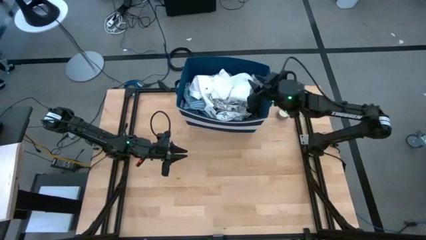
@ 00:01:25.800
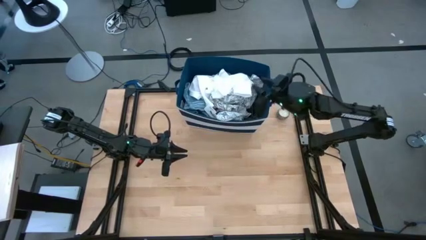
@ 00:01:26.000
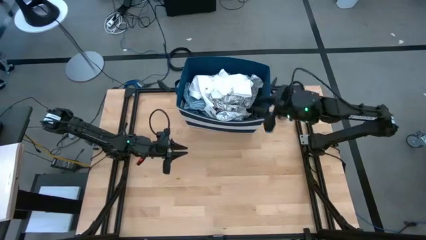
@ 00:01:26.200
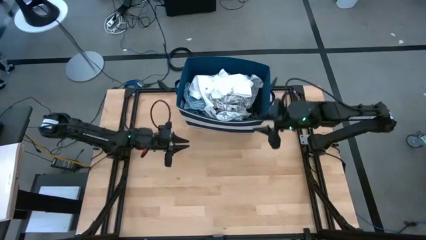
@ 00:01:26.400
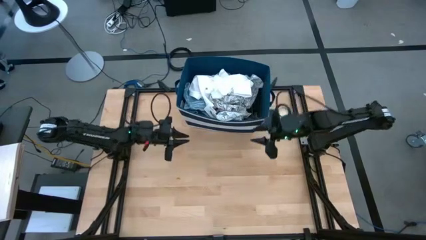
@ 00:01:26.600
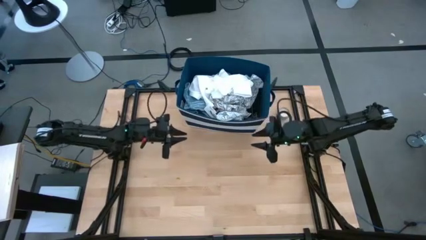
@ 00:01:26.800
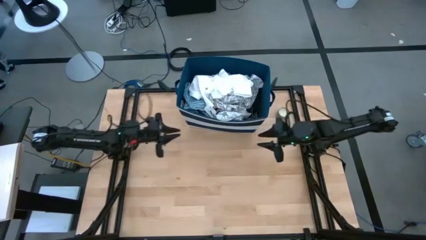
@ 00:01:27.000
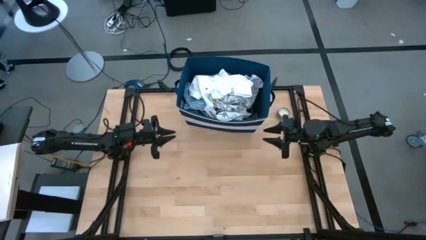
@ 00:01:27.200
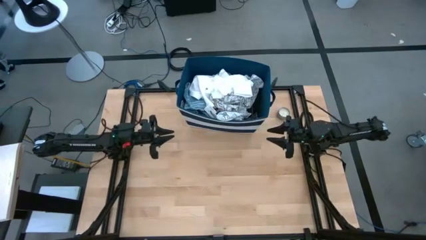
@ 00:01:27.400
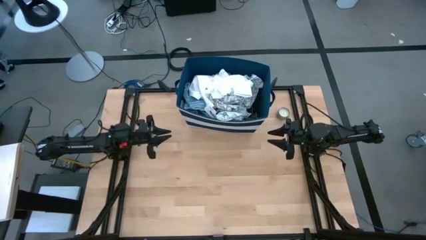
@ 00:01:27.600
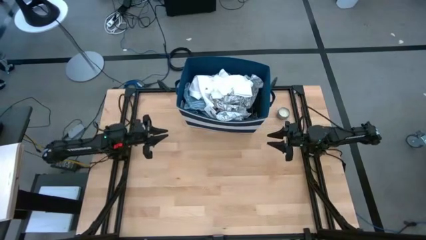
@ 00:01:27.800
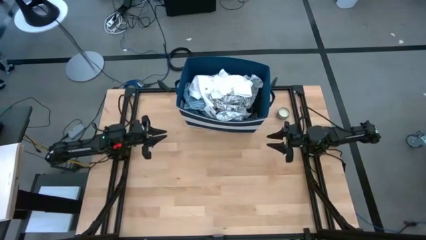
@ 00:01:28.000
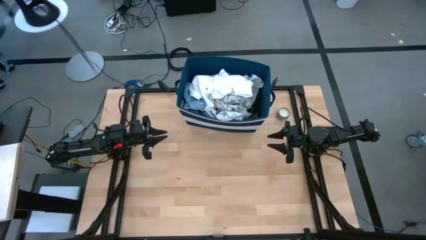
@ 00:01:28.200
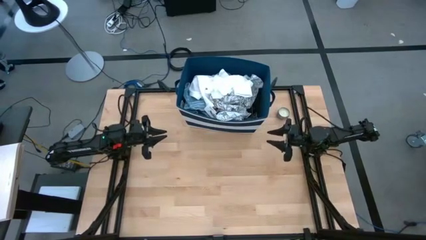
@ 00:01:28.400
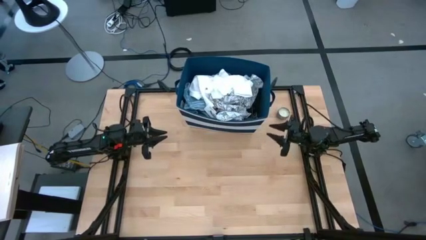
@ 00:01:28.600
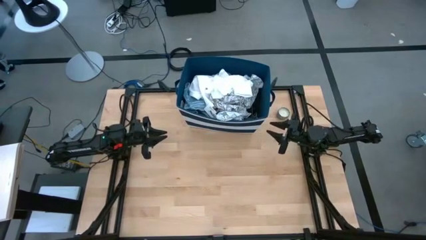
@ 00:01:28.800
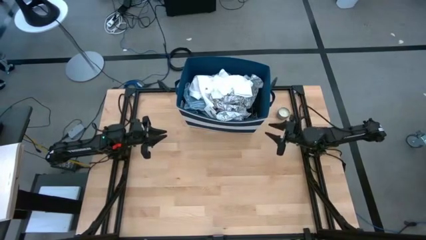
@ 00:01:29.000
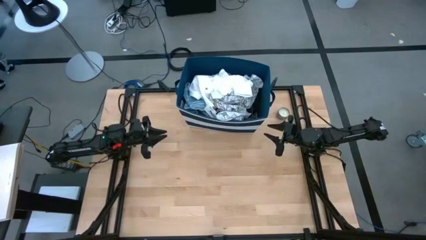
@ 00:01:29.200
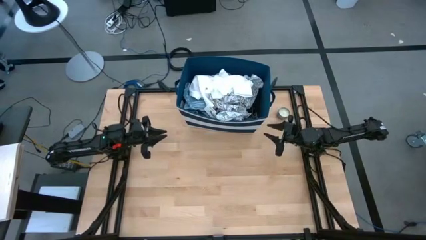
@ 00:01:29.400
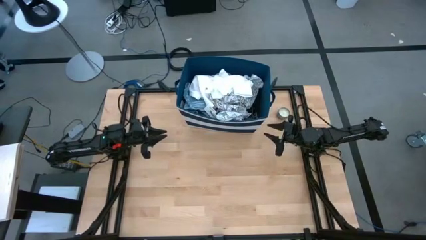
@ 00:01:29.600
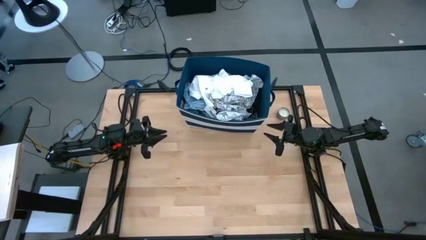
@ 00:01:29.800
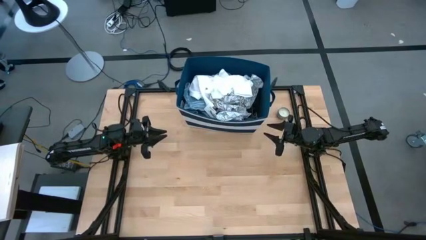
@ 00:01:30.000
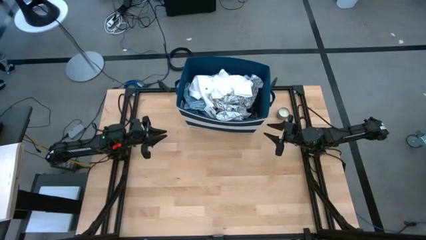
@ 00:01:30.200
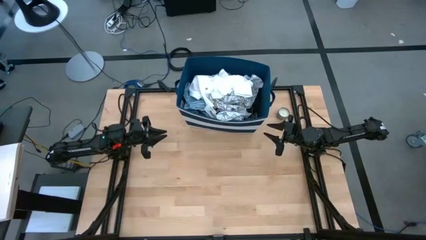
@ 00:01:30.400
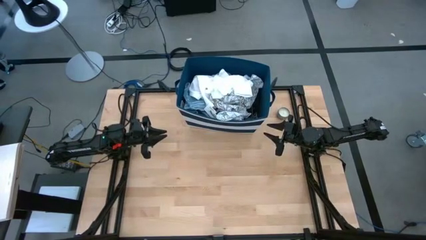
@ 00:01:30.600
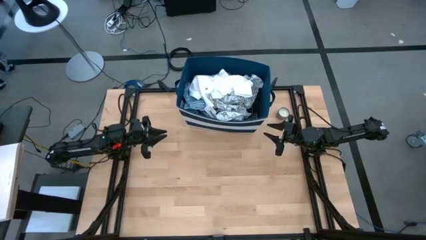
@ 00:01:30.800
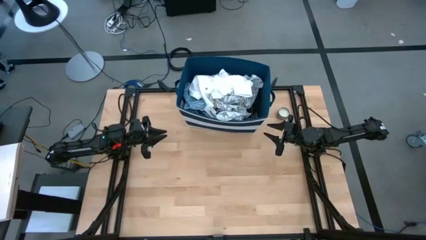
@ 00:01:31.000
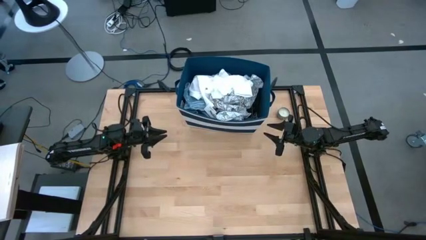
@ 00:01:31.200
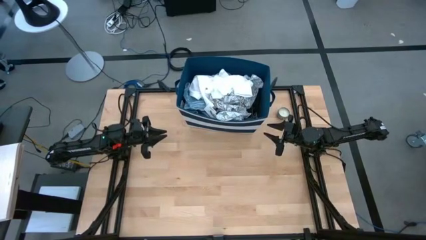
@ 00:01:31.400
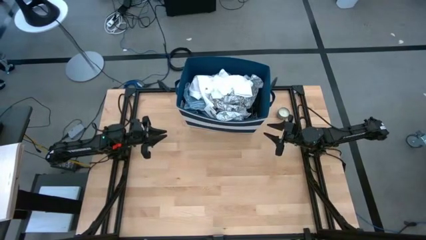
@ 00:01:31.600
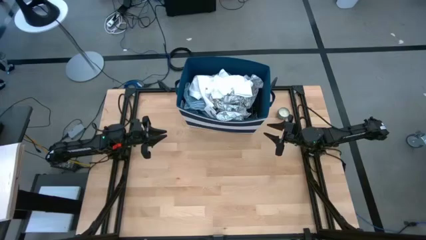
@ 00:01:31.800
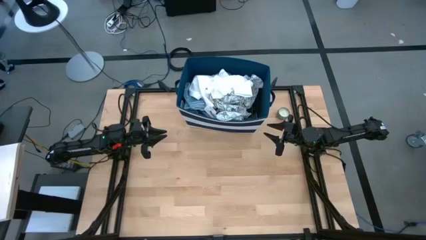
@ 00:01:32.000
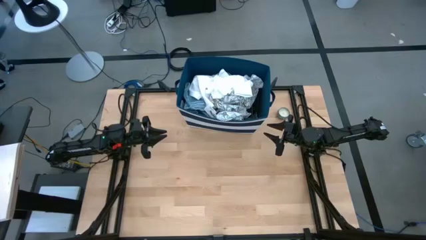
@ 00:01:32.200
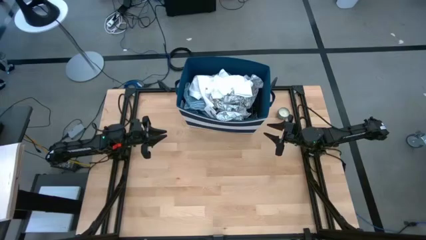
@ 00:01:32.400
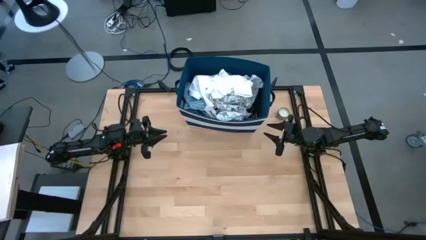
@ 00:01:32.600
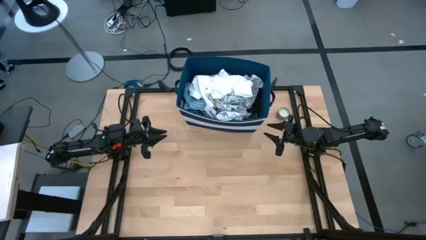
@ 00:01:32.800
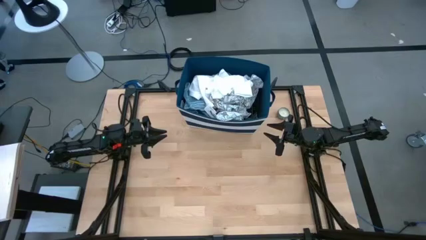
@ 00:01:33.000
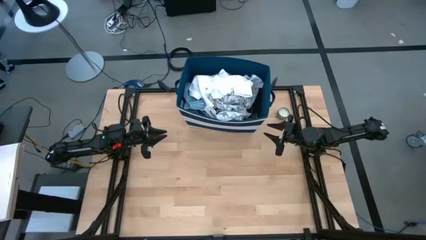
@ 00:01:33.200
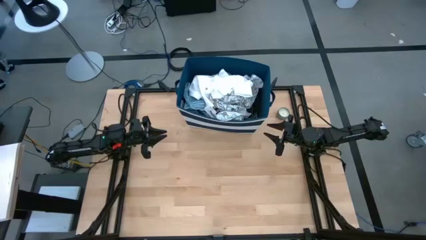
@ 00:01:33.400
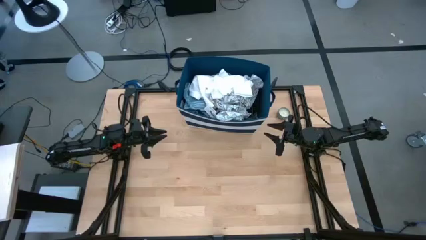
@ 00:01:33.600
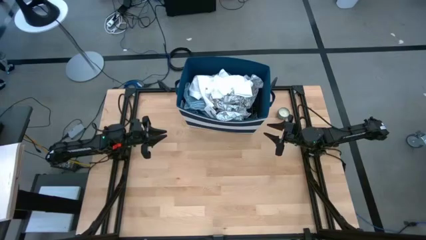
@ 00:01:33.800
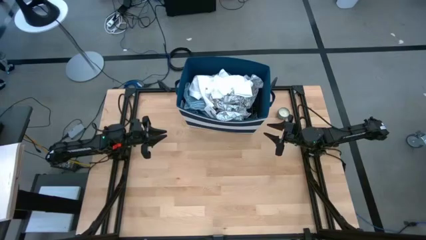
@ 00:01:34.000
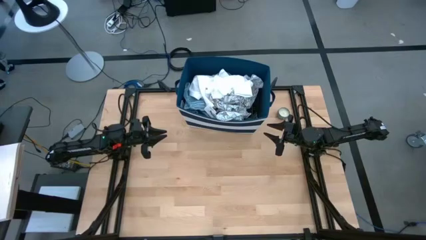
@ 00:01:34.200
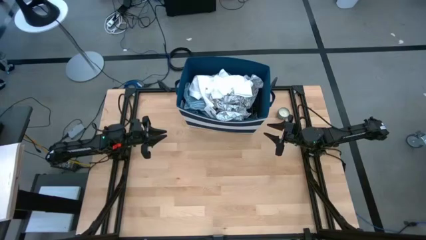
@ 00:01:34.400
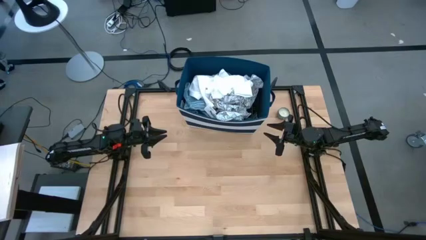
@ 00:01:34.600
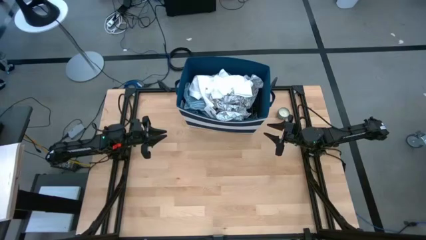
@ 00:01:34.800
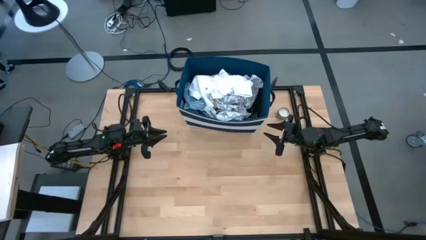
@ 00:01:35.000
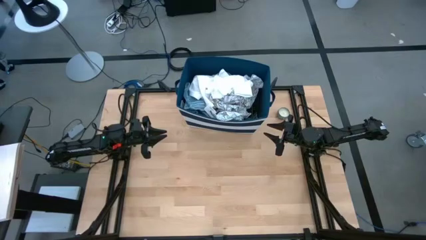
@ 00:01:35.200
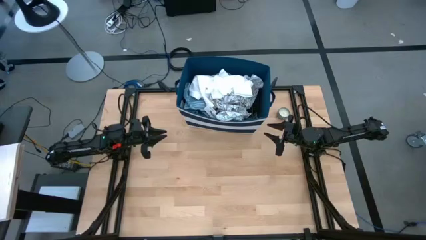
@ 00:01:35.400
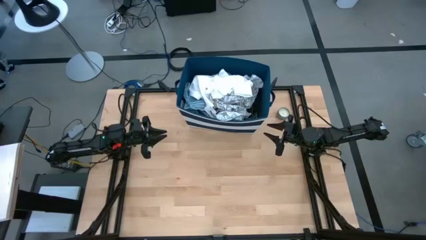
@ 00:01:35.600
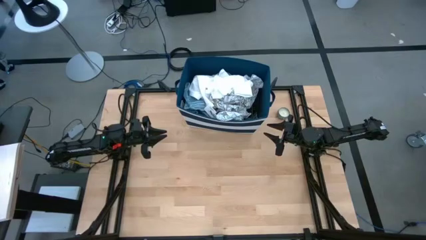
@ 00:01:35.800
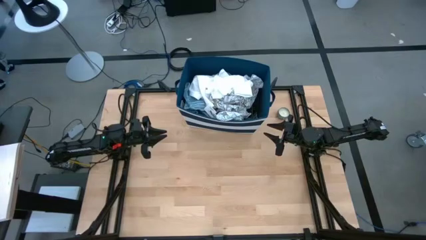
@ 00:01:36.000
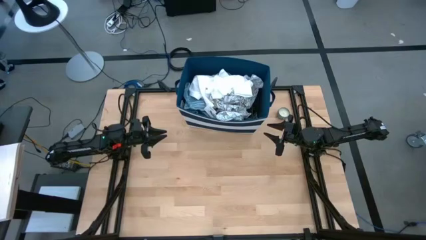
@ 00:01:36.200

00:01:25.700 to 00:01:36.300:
Task: Sort clothes
Return to Home Position

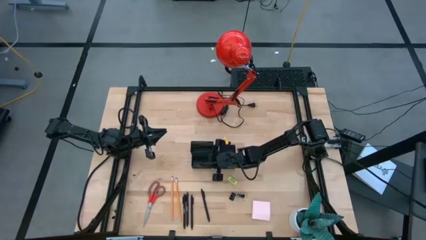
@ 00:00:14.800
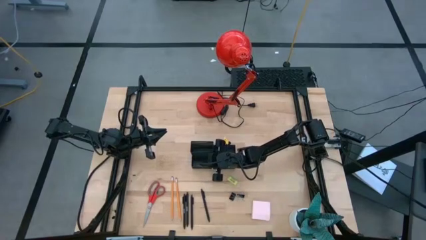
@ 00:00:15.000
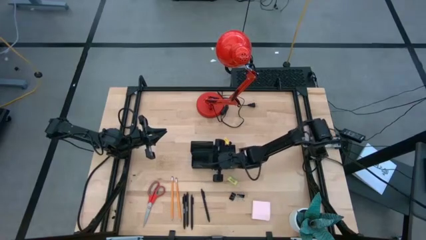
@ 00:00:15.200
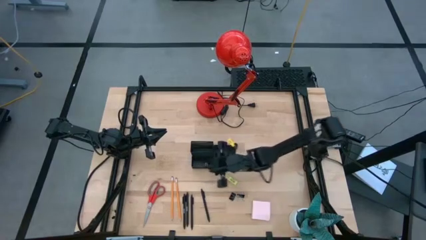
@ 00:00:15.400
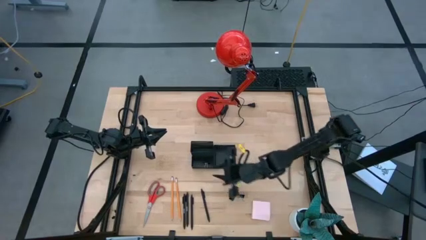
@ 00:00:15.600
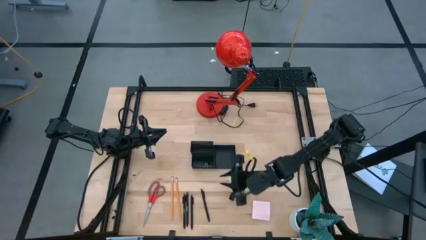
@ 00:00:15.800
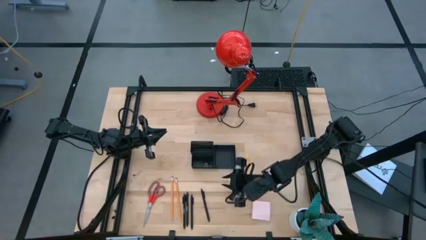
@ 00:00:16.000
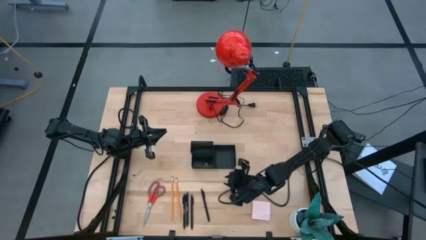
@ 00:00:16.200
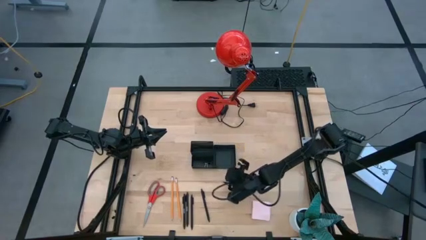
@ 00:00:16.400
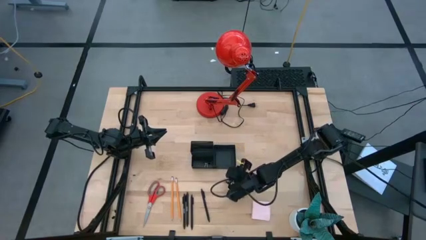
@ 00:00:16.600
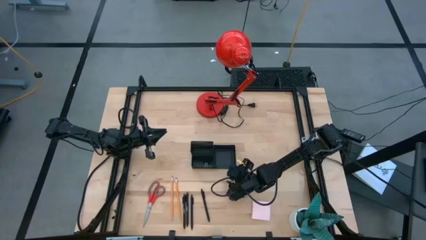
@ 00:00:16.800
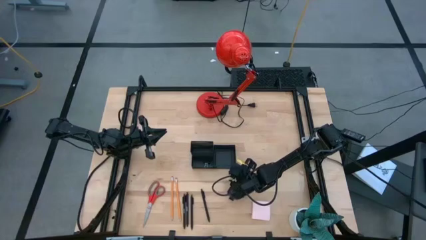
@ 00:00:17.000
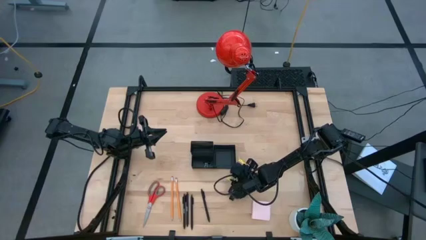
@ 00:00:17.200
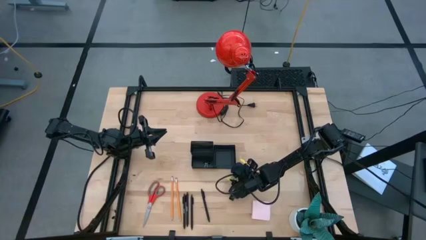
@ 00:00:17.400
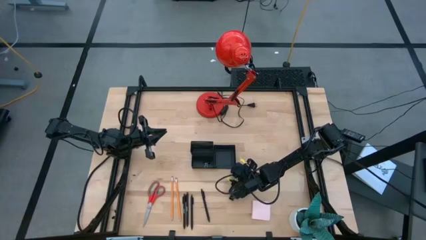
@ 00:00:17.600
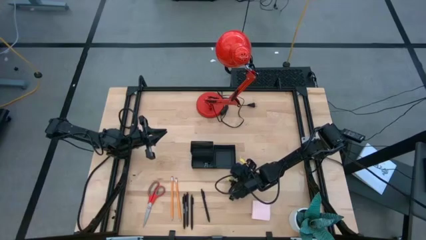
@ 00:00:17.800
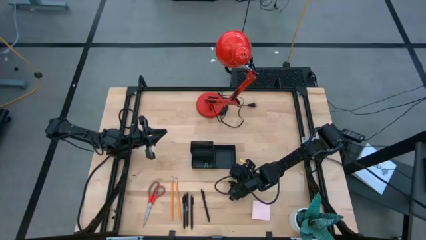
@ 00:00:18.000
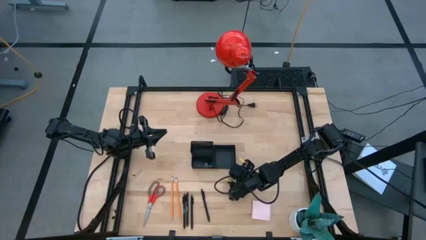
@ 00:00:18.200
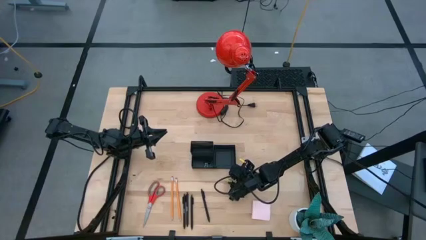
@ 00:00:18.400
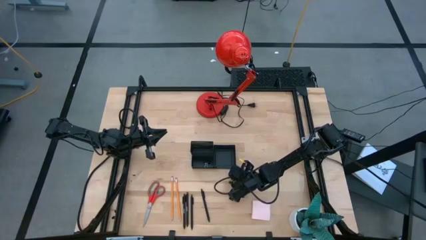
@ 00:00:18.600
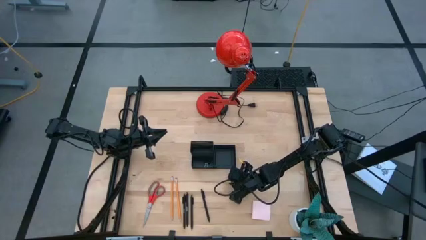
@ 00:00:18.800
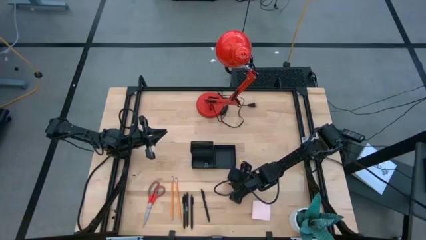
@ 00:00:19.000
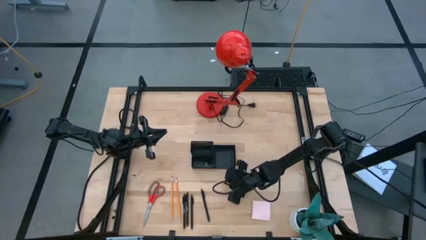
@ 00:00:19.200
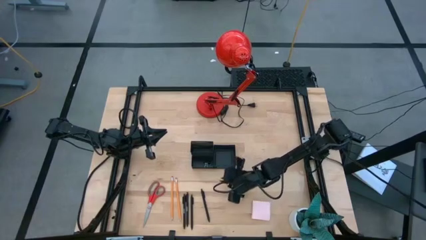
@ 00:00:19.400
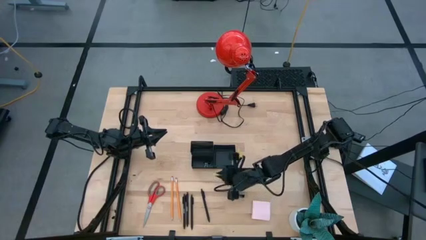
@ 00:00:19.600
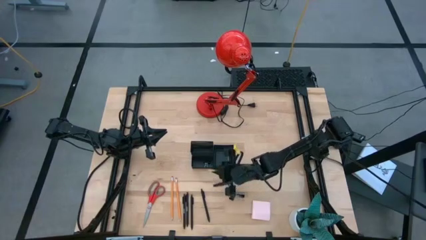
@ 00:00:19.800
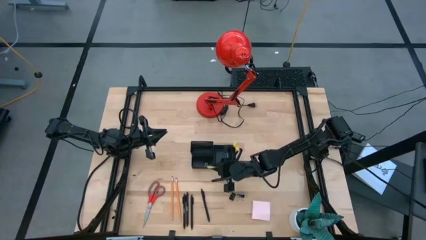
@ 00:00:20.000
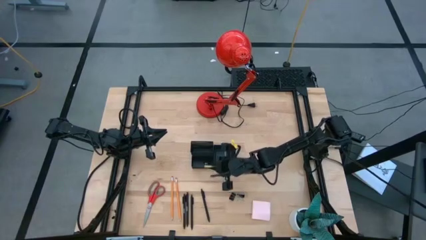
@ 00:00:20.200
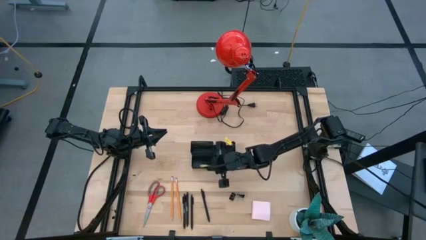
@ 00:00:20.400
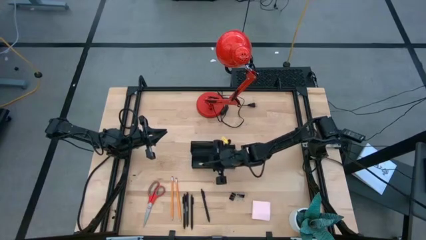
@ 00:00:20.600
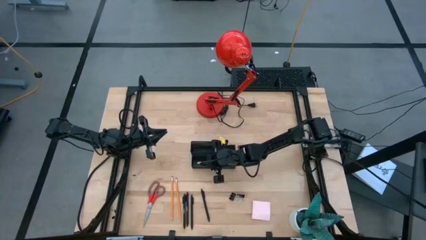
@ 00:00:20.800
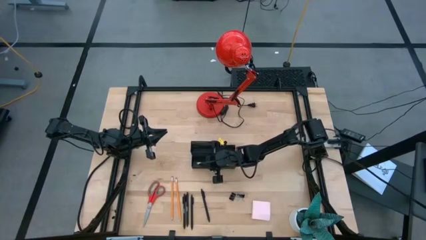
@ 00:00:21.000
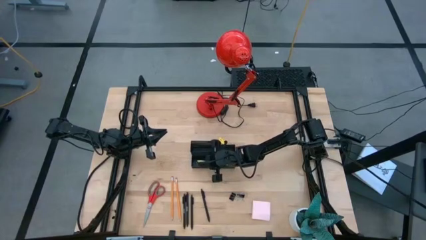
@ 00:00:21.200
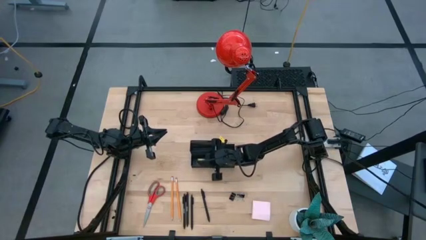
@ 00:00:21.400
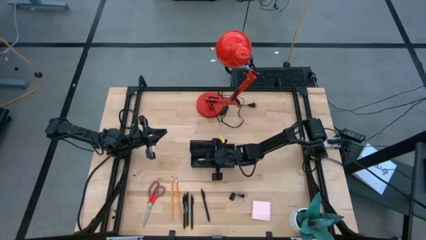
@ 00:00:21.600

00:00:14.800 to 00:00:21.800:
Task: Pick and place office supplies into organizer
Put the yellow eraser into the black mesh desk organizer
